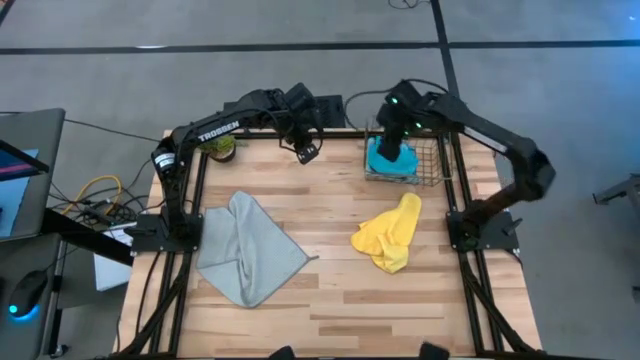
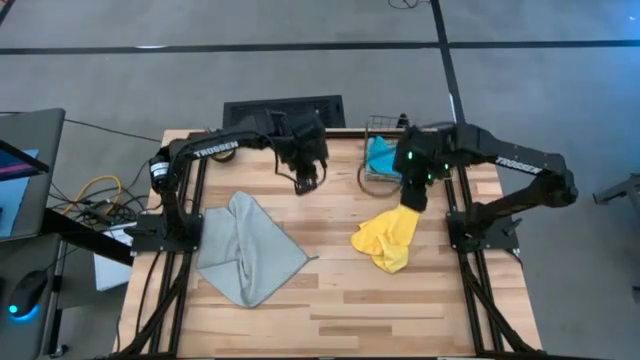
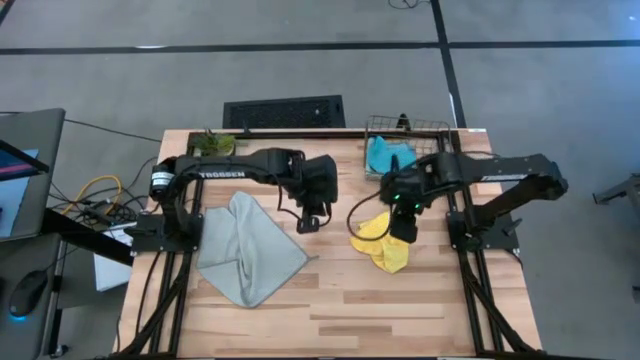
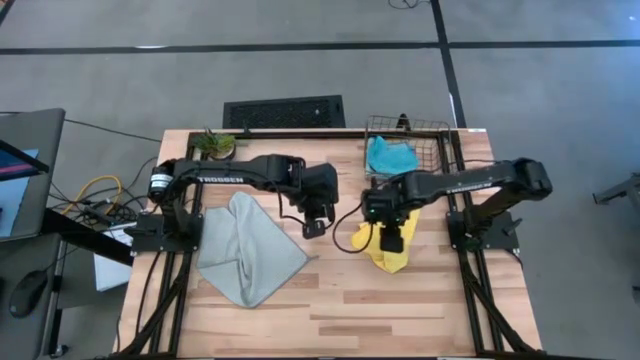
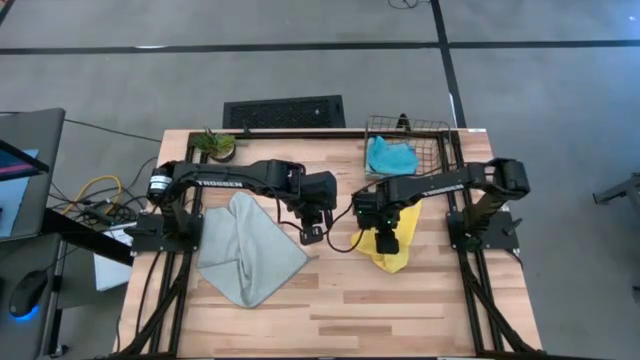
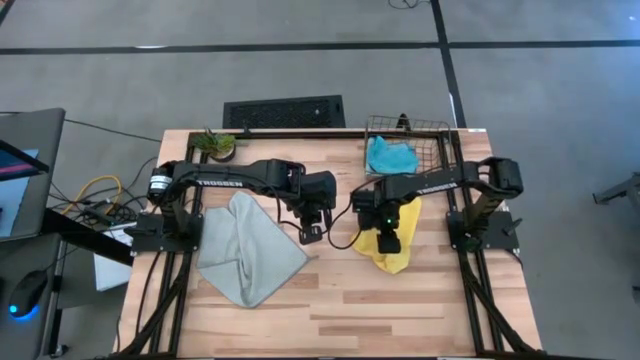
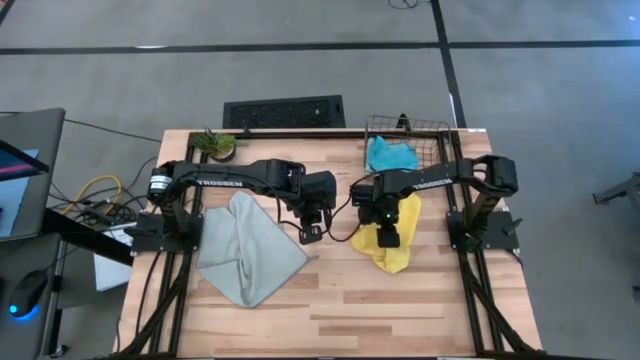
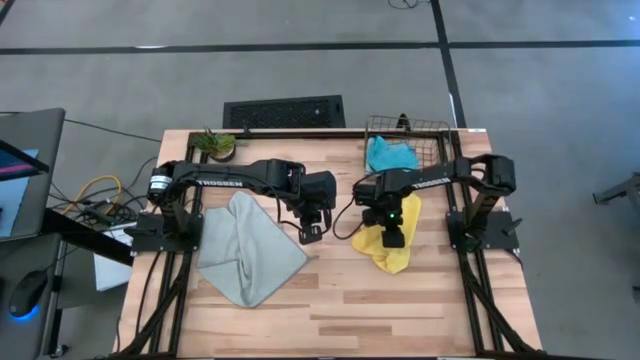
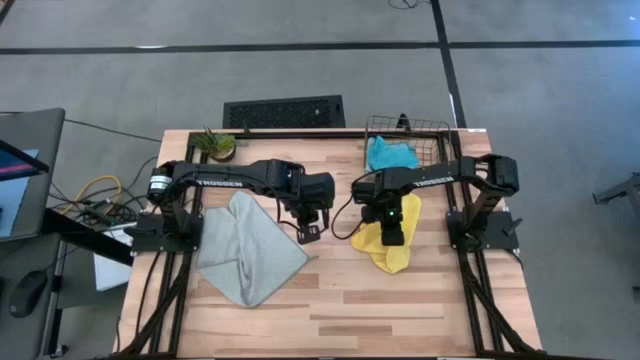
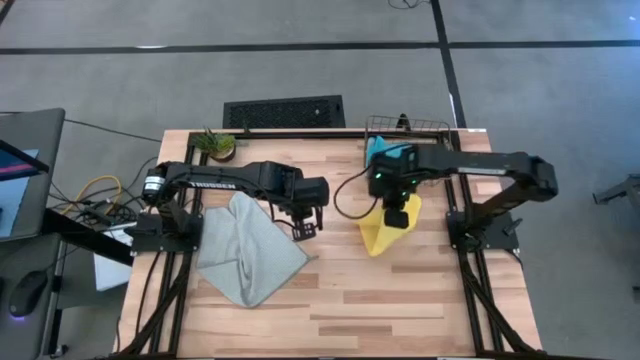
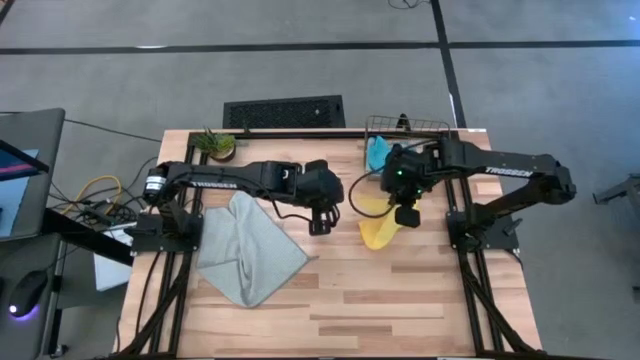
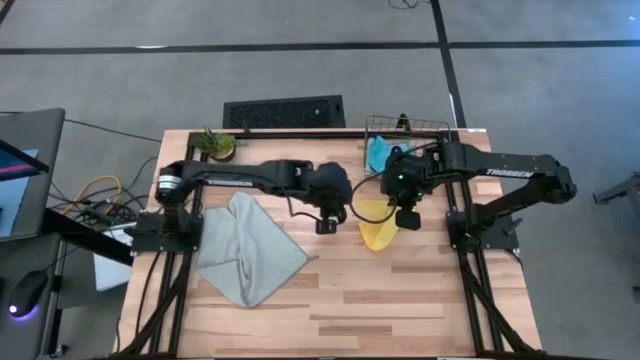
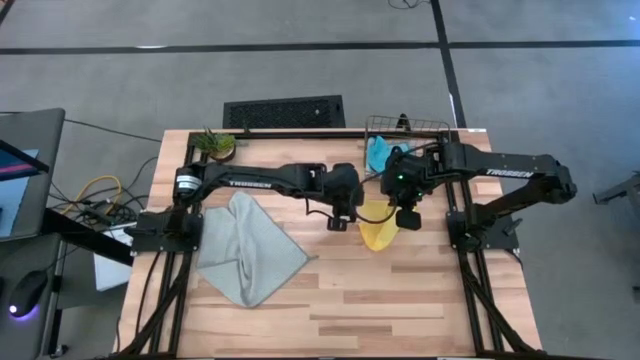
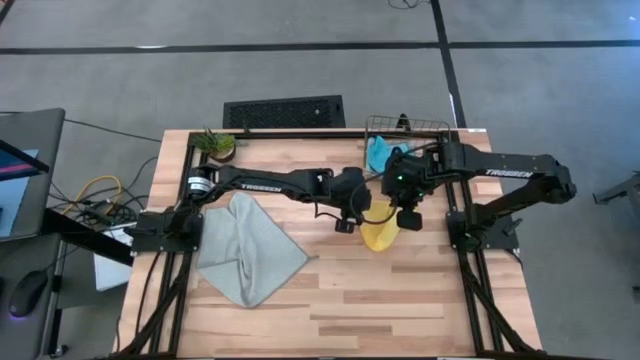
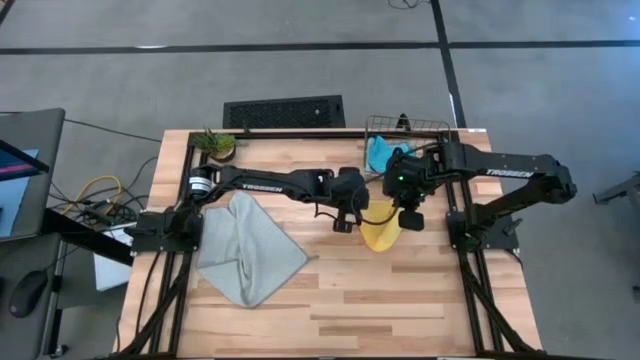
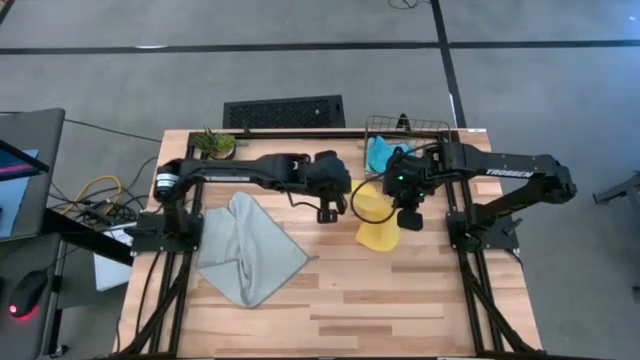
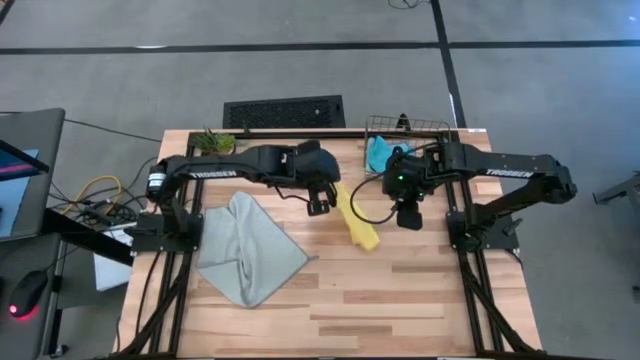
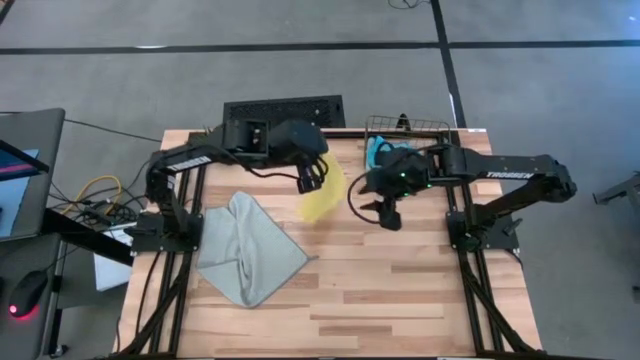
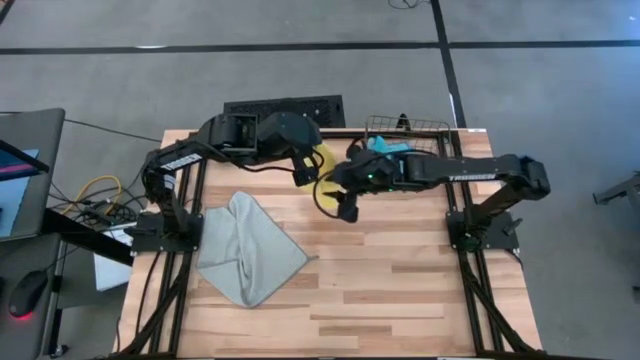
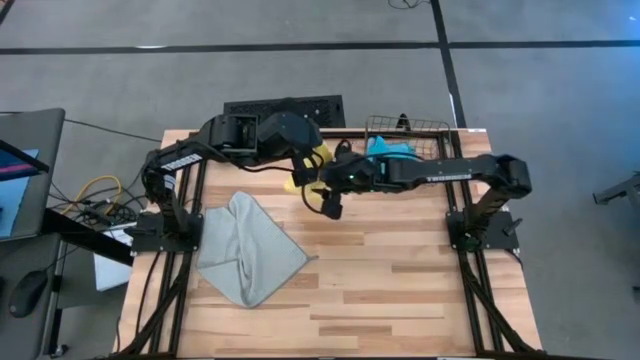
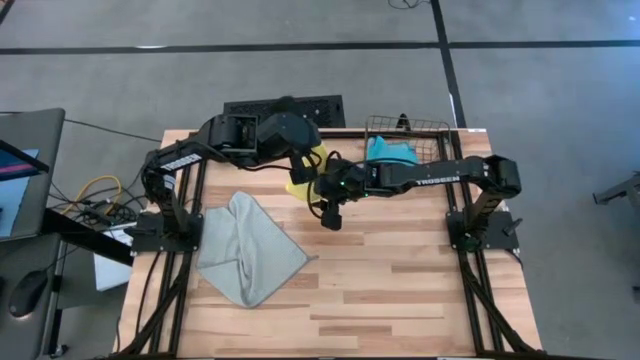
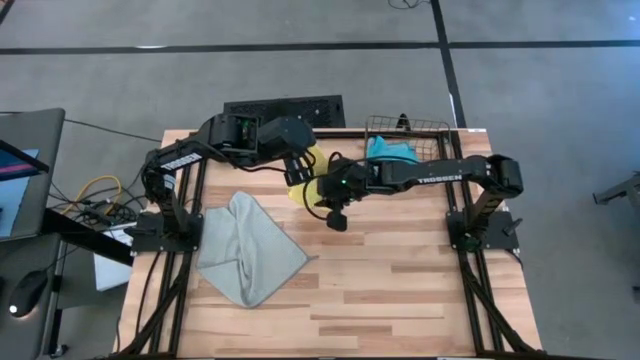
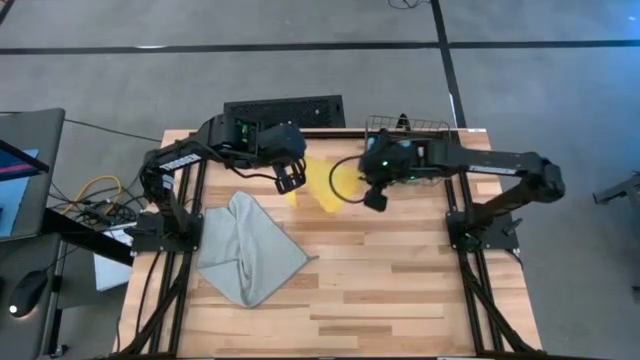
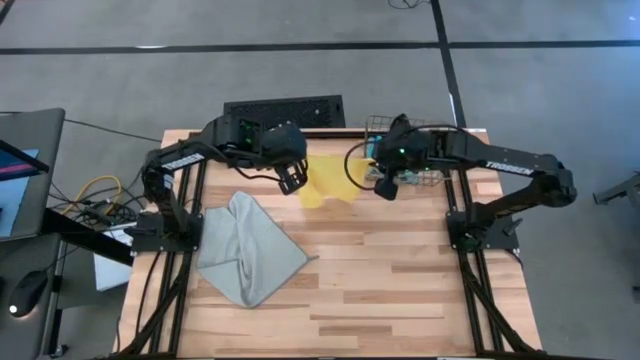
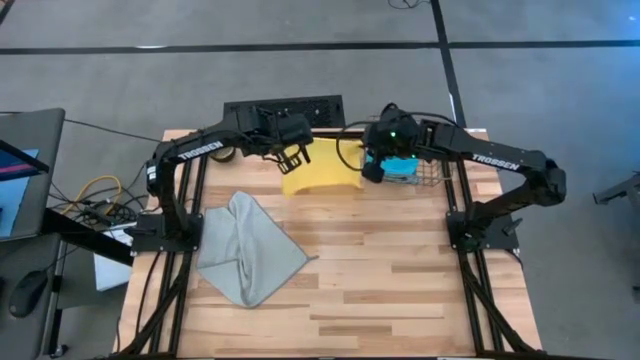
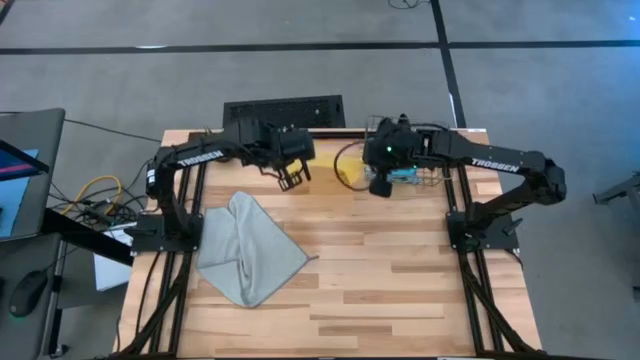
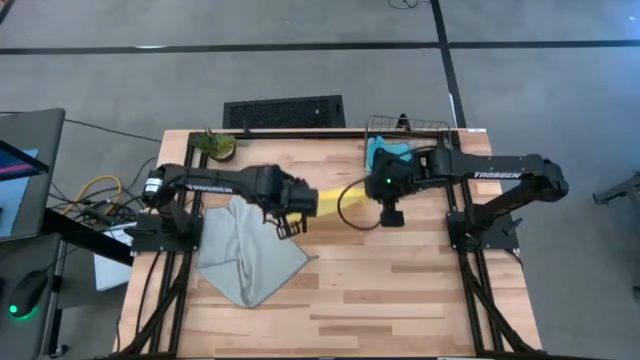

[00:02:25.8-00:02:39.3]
Task: Fold microfiber towels
Fold the yellow microfiber cloth

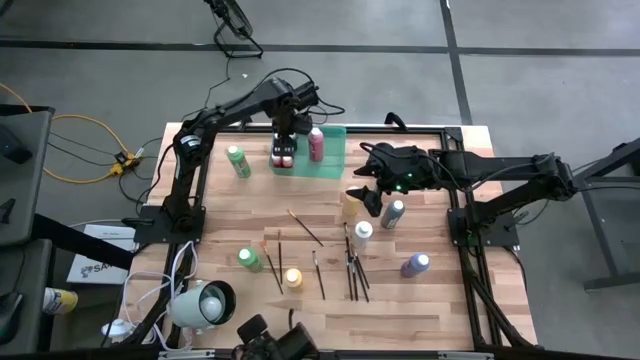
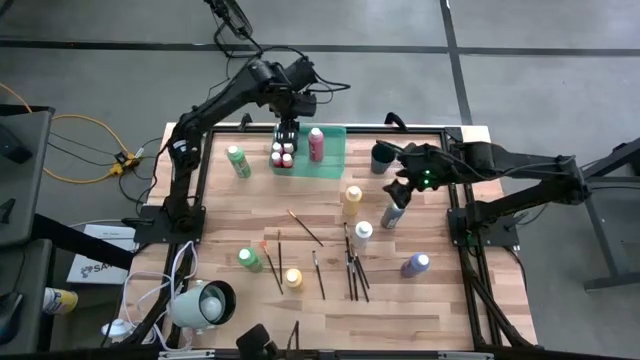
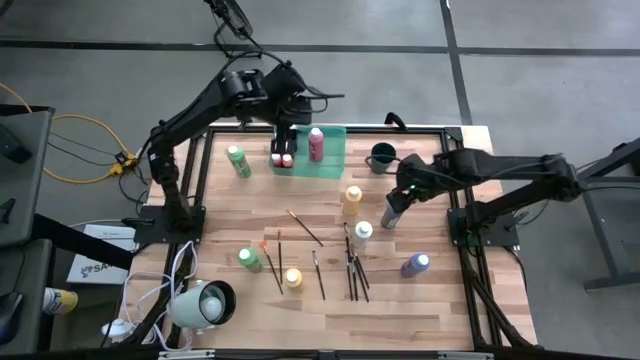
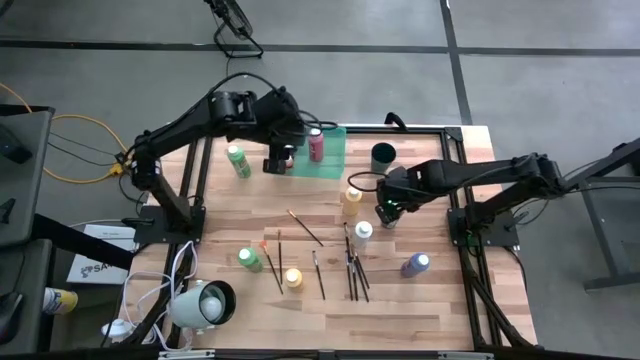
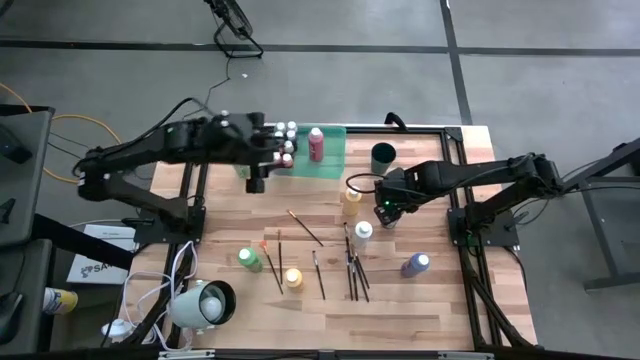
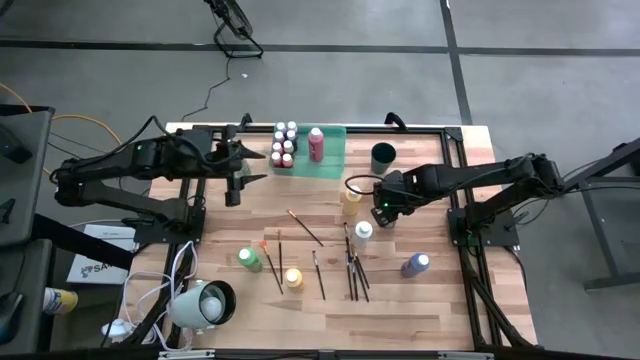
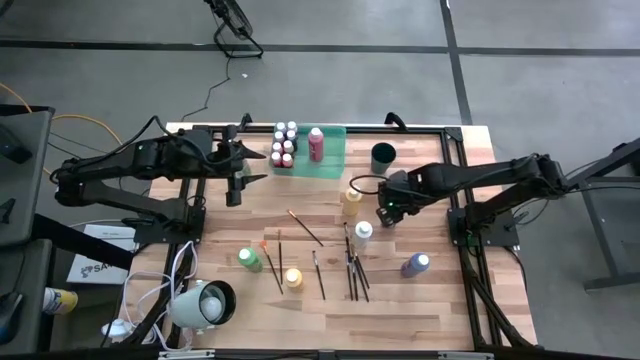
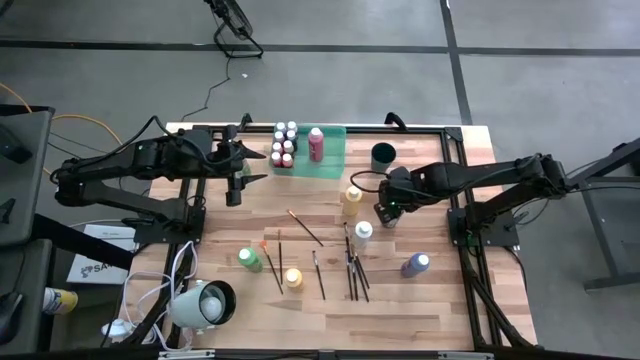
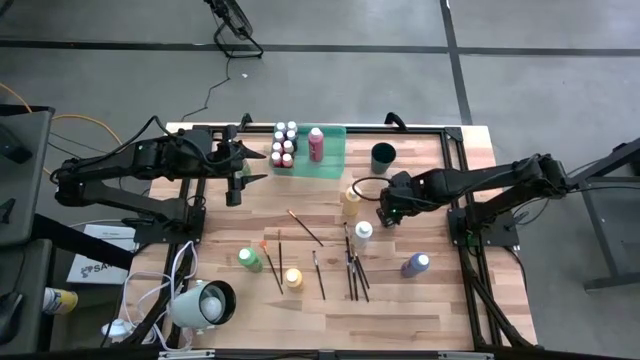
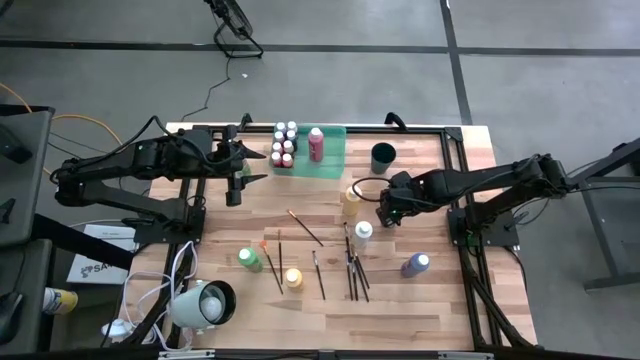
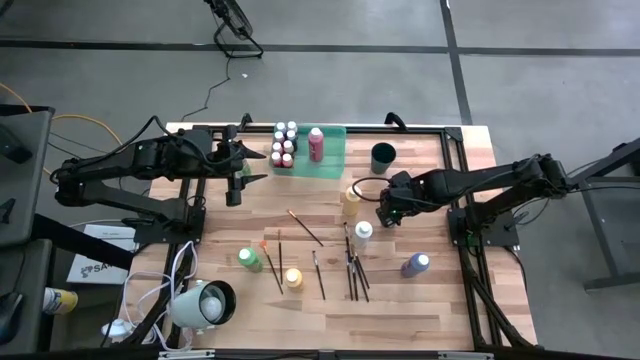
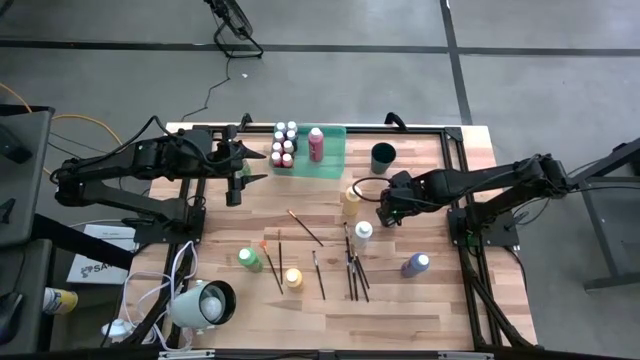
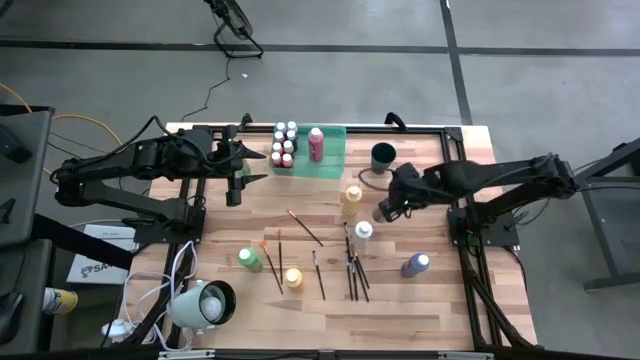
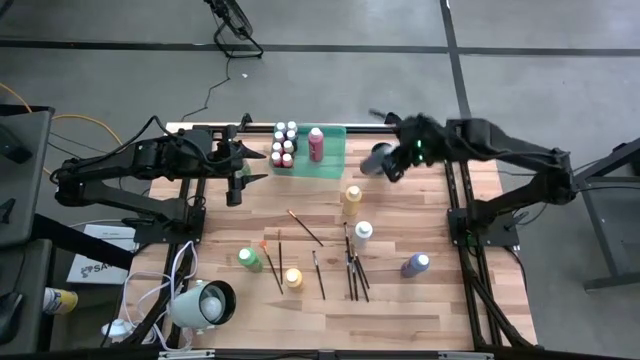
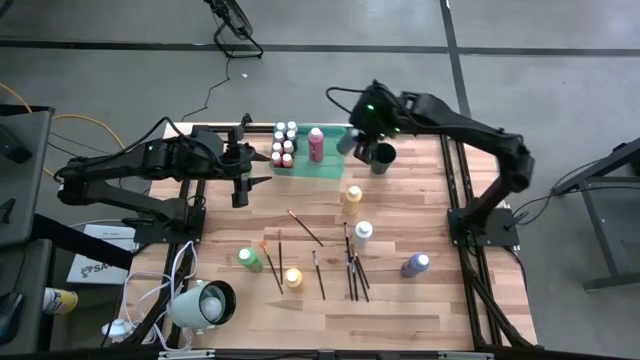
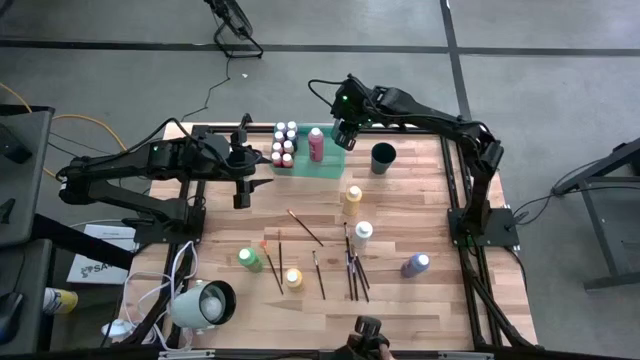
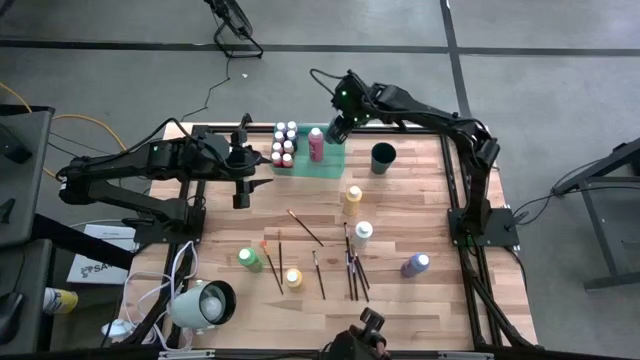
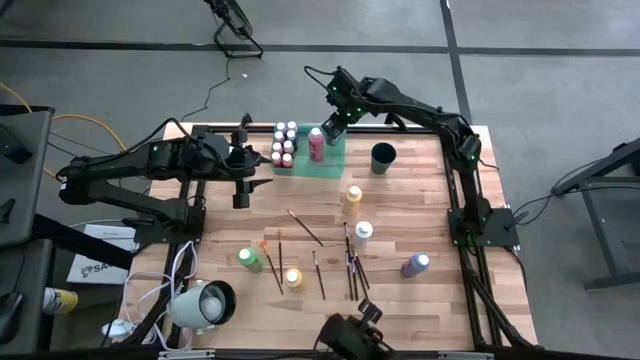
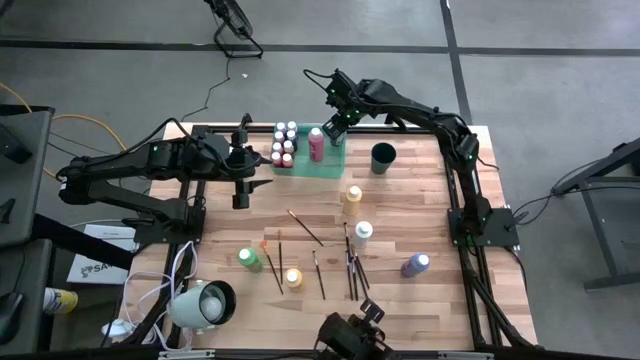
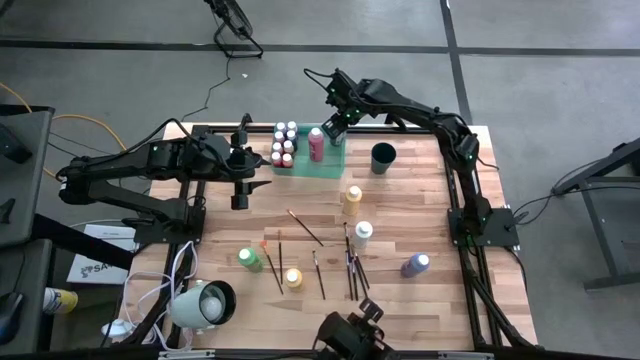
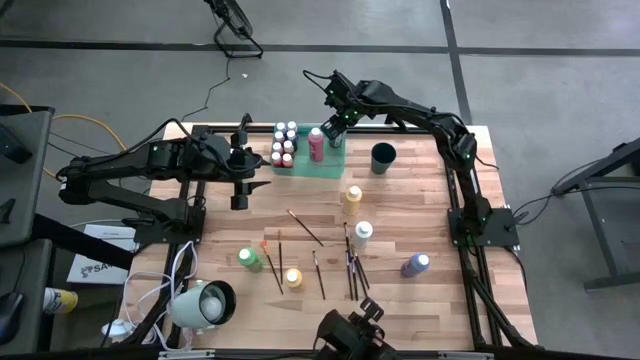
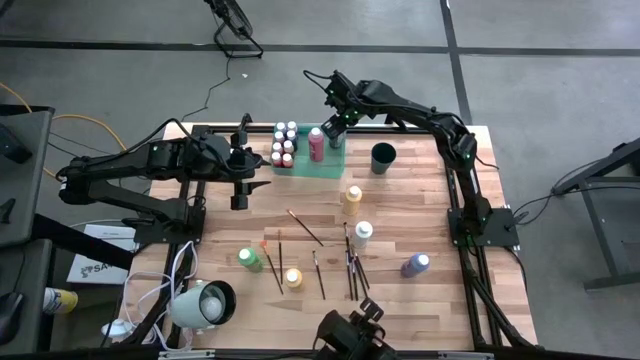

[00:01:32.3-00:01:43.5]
Task: Pick & Place Paint Supplies
Put the black paint bottle into the green bin
